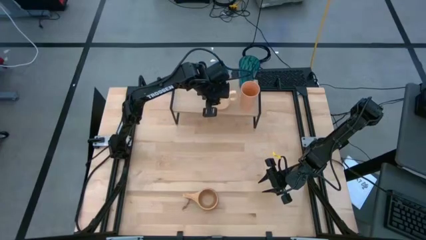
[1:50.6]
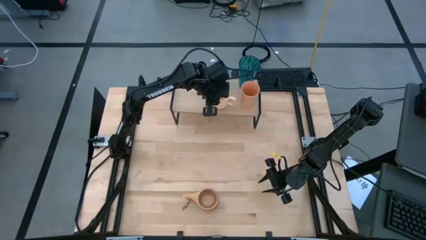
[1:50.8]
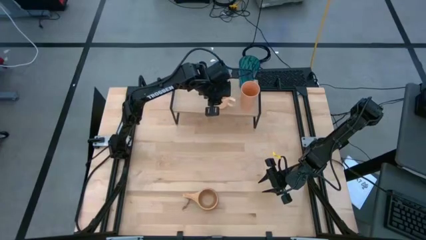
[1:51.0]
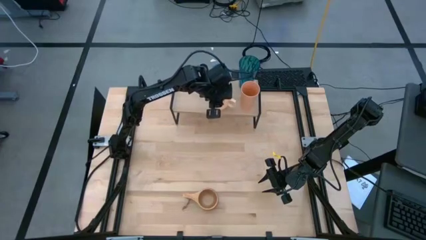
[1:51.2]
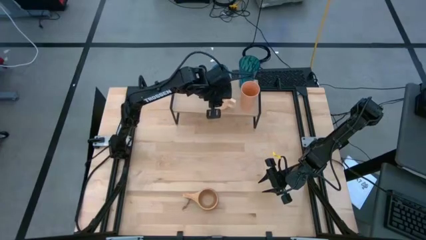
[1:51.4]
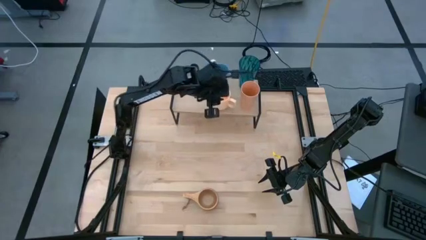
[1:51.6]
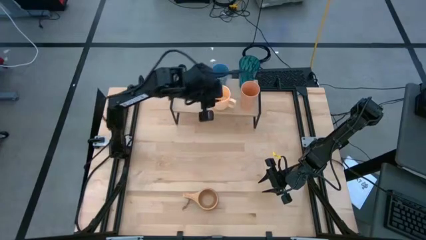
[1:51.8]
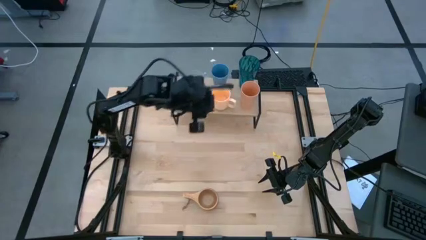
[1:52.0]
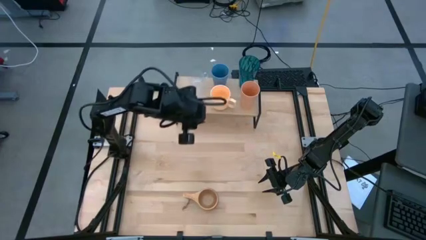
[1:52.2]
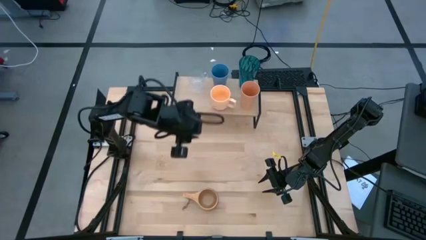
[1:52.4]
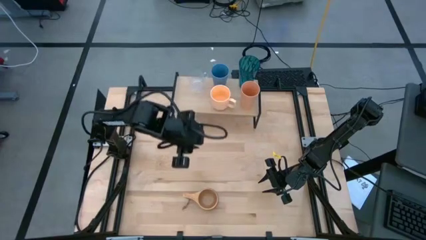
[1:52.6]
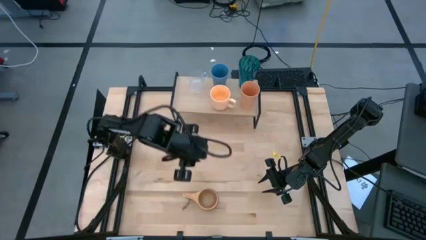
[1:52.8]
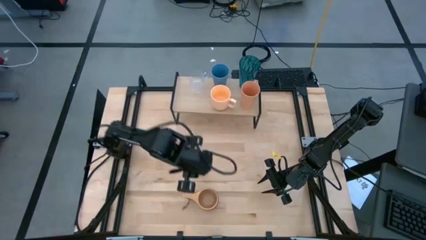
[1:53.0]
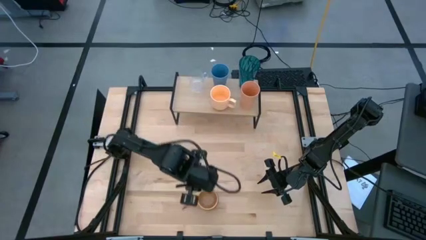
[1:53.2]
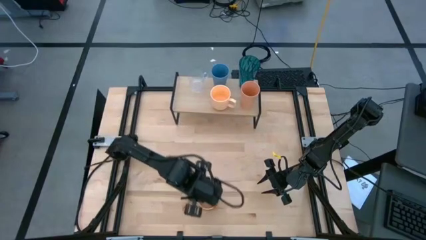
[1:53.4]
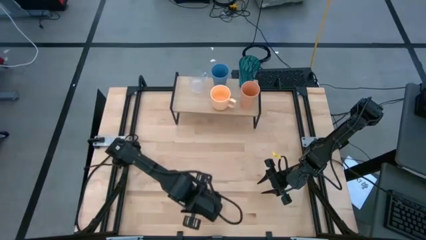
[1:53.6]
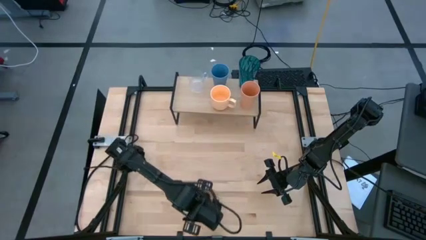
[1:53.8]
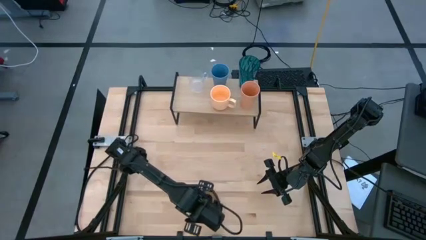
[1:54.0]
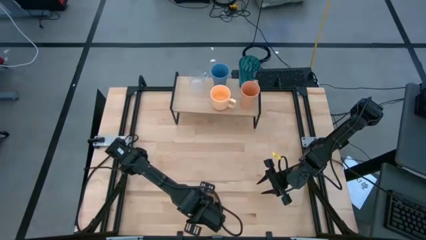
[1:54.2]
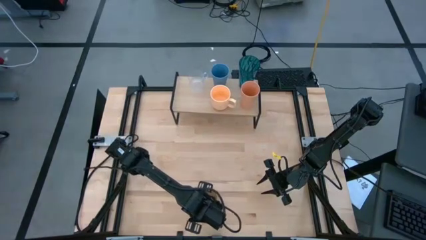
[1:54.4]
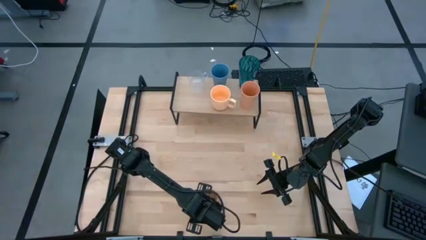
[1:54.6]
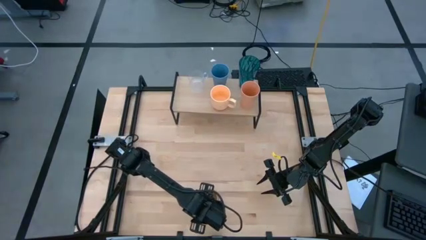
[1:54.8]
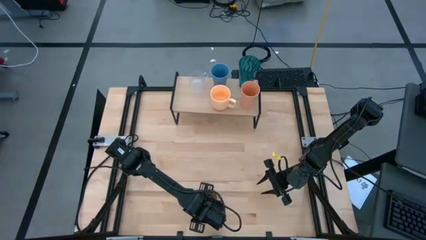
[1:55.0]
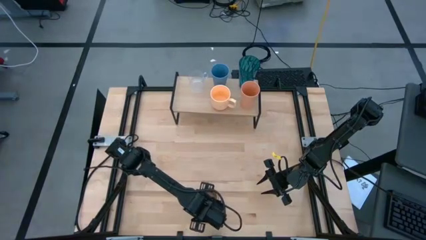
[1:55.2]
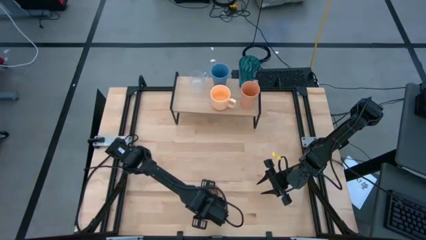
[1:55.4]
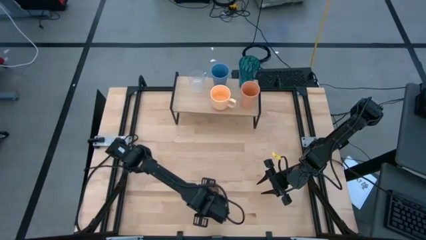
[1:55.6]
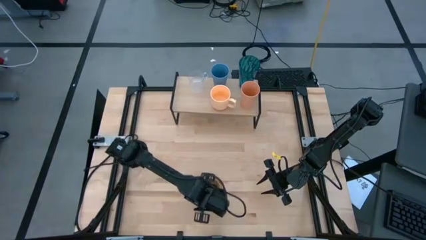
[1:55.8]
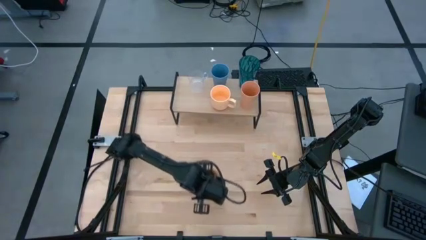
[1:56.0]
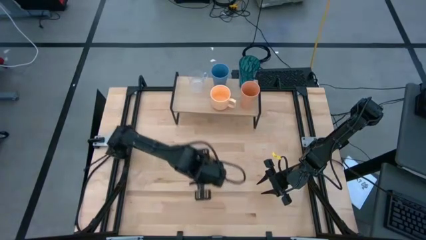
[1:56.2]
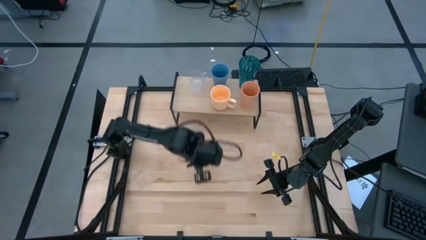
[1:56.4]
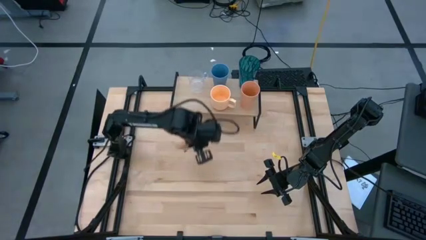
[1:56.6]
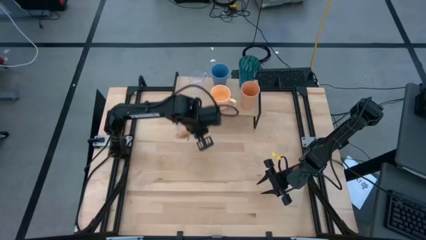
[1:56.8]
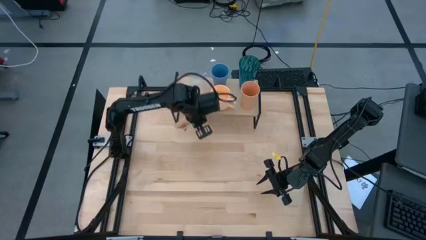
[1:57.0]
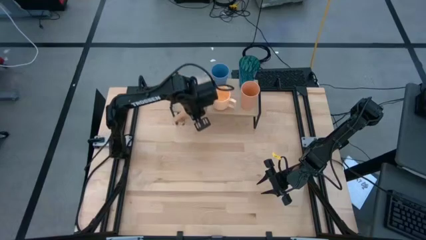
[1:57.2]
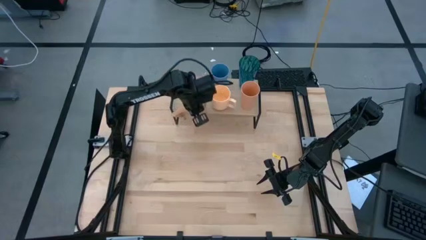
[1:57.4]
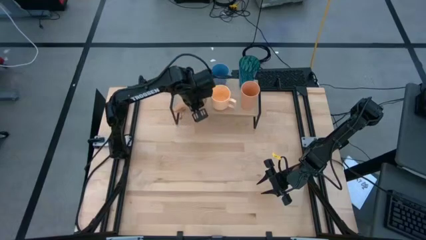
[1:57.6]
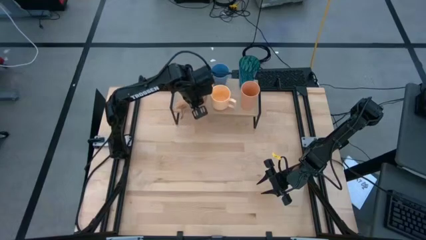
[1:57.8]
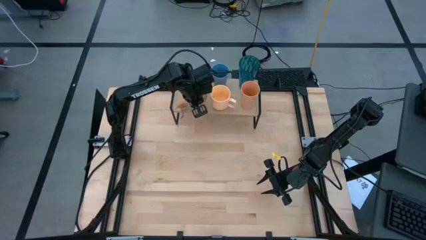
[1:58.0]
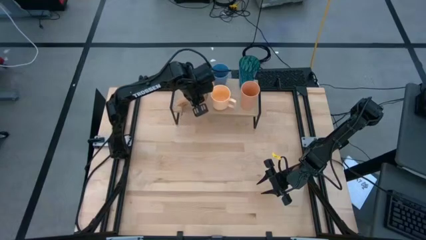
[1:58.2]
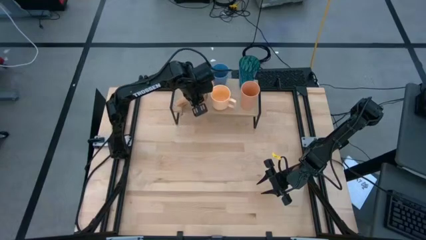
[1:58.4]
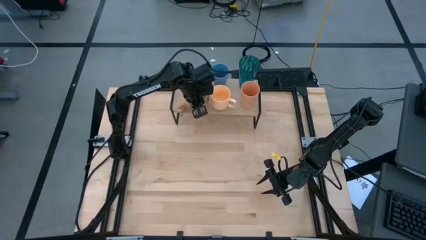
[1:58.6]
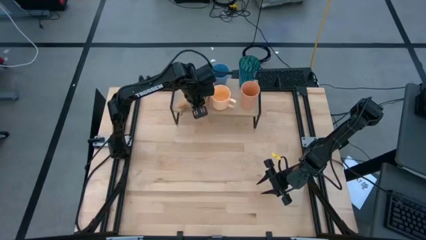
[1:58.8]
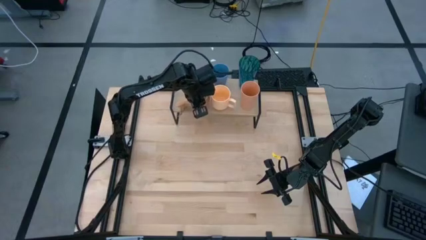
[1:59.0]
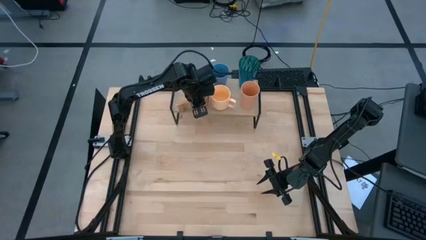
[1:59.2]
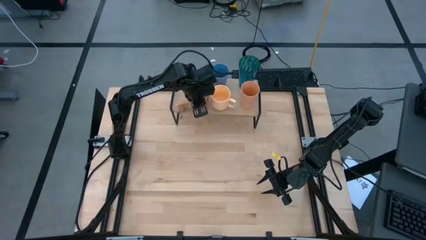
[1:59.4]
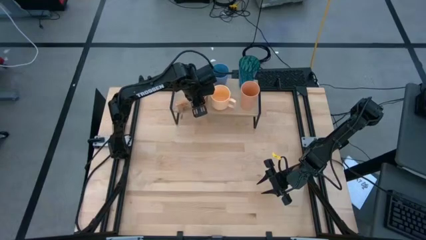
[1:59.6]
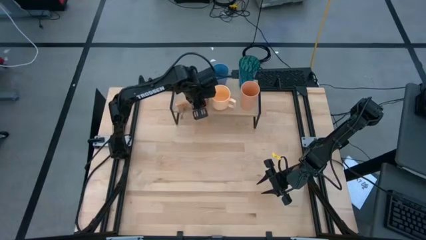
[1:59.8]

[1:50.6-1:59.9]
Task: Stack small to large cups/mugs on shelf
Put the brown wooden cup on the shelf

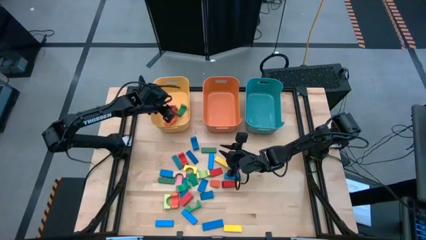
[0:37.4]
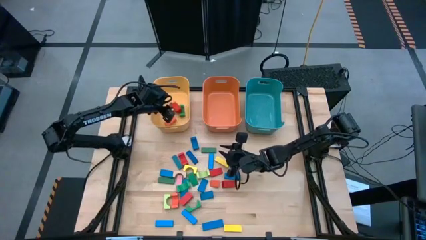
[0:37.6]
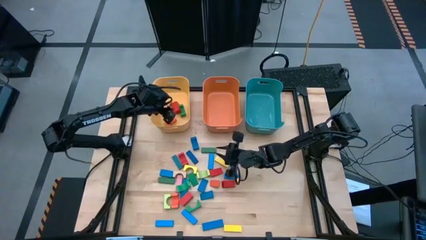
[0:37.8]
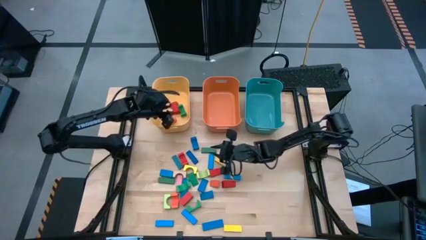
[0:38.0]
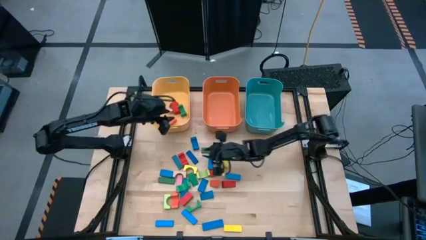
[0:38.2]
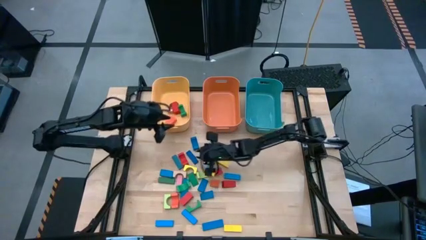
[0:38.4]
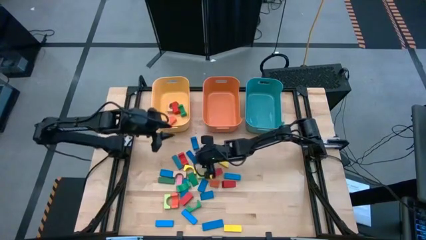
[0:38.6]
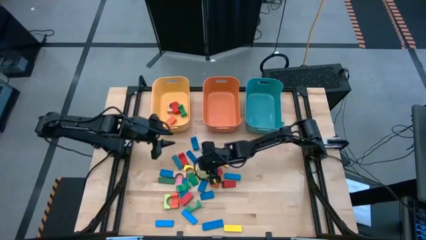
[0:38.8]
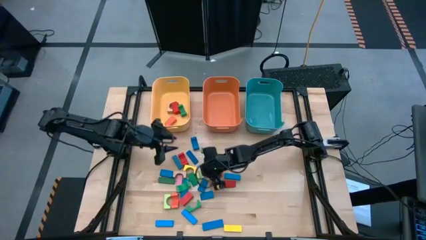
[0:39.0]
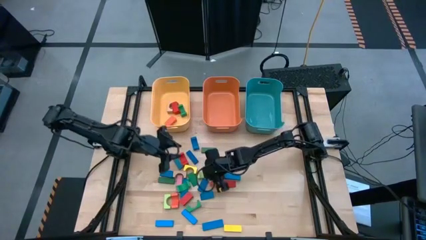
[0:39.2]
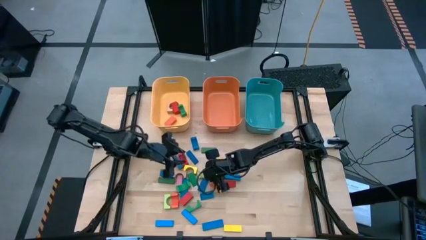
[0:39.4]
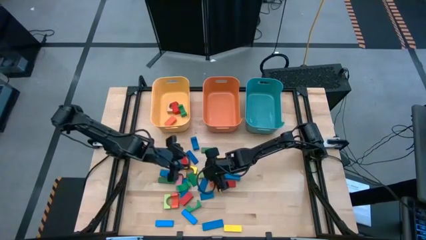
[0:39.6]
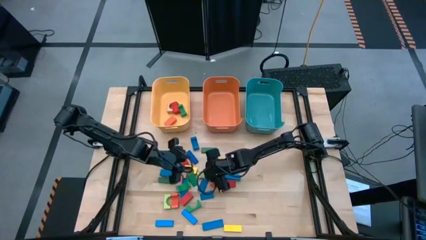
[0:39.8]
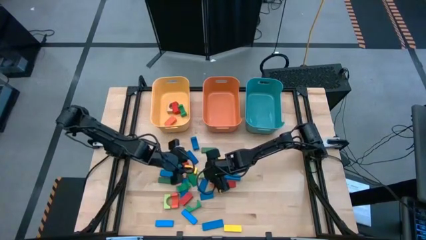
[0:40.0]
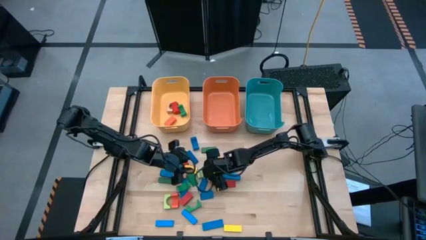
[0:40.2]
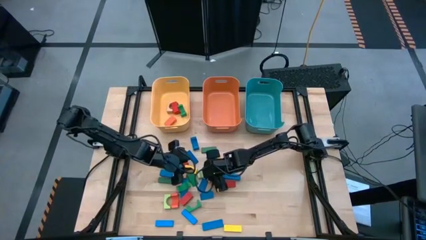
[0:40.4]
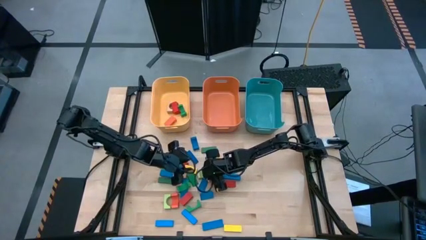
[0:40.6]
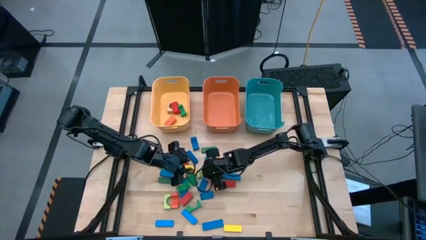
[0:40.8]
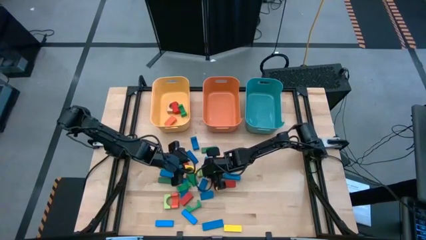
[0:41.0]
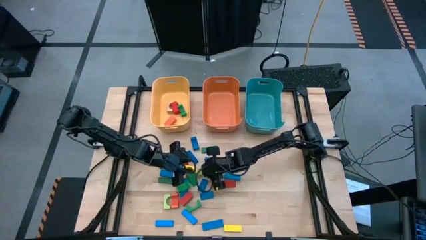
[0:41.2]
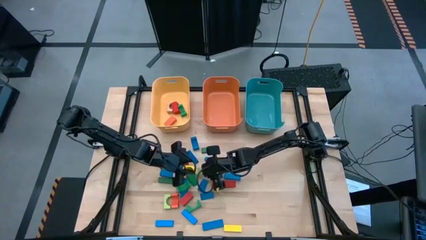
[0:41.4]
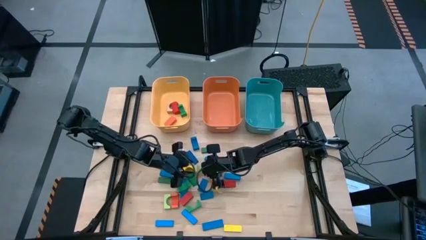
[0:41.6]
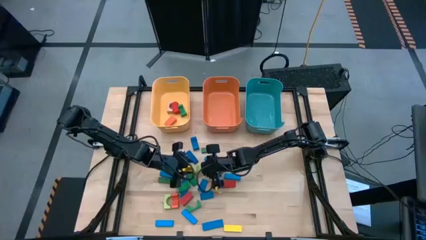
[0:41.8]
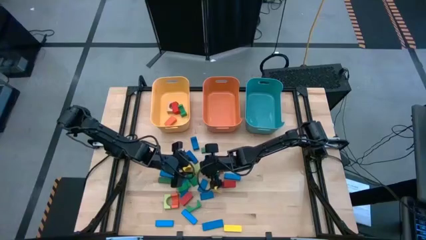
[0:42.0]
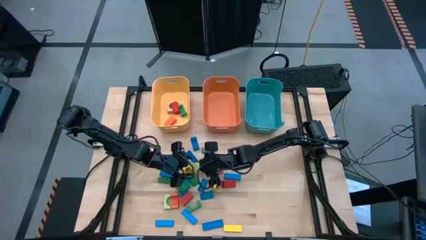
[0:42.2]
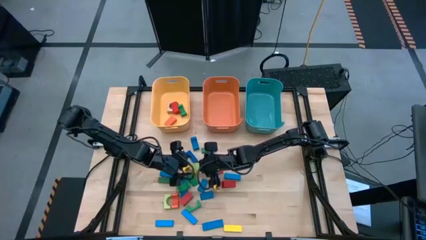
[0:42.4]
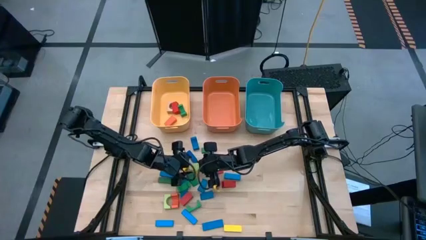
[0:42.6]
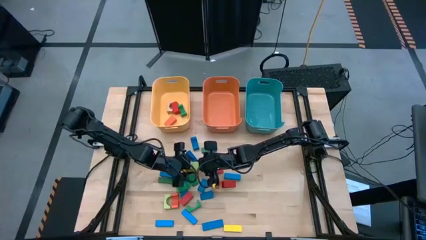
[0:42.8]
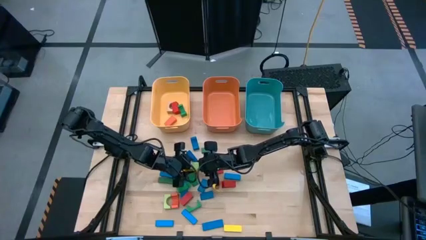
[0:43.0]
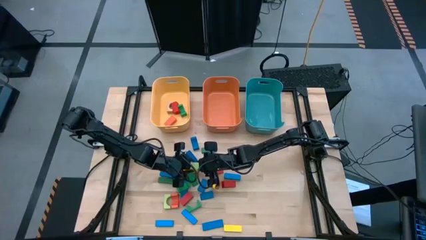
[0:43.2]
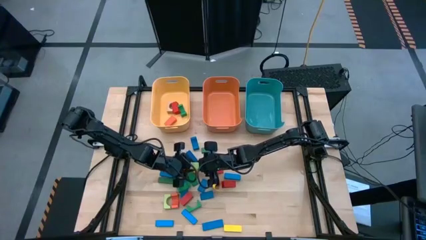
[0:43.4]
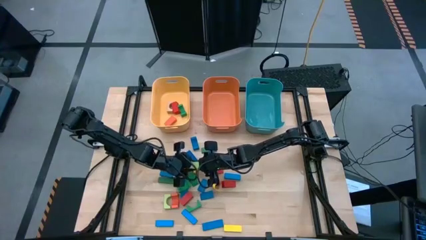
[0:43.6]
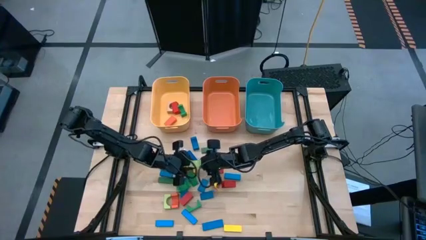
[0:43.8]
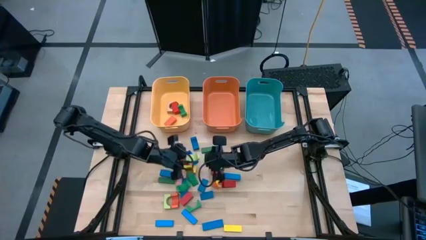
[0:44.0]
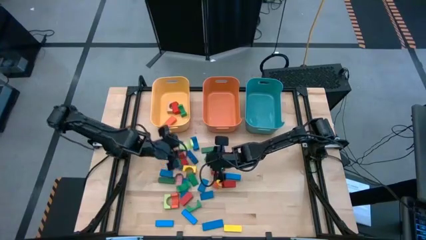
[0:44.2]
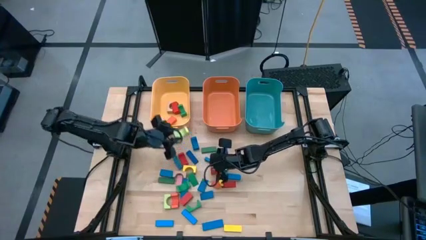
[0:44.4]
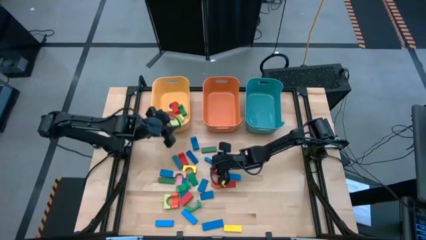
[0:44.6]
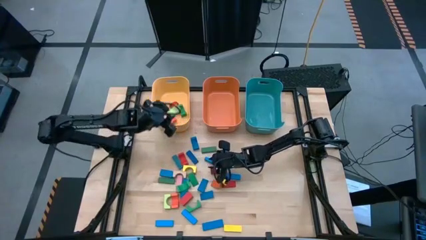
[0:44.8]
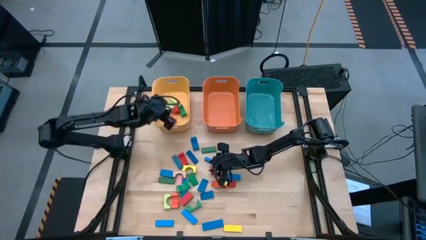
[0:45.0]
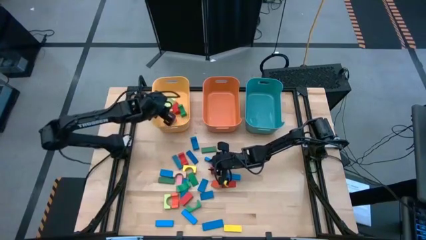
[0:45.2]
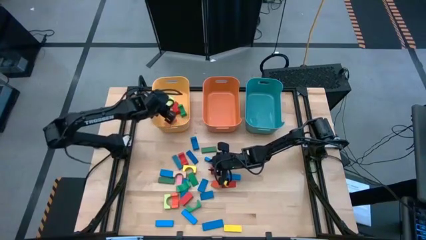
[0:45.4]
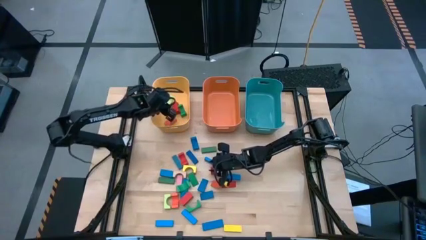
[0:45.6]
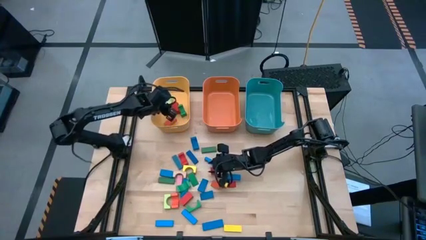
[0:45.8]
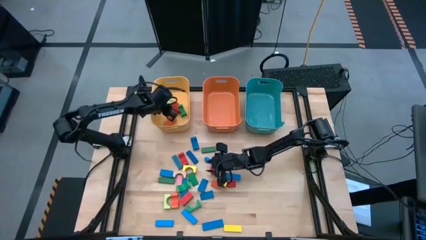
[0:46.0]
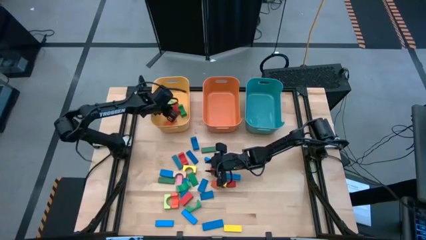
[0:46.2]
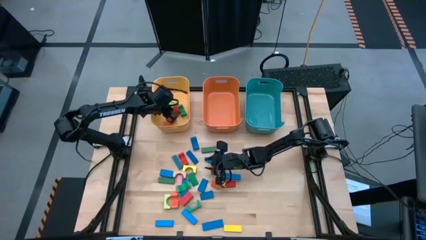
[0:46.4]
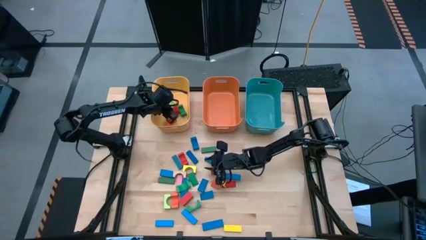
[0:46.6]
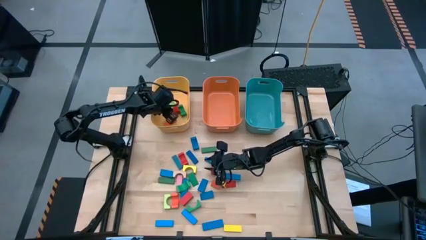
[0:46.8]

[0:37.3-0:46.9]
Task: Sort blocks by size
Put the top light green arch block into the yellow bin
